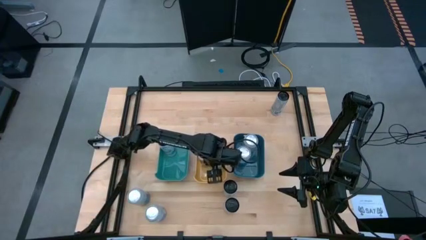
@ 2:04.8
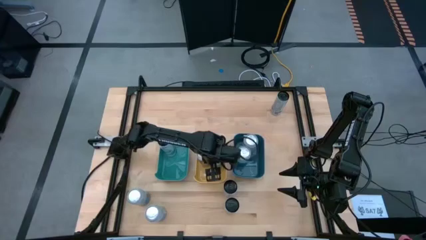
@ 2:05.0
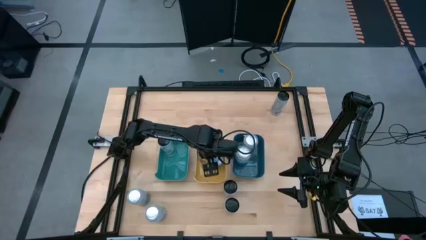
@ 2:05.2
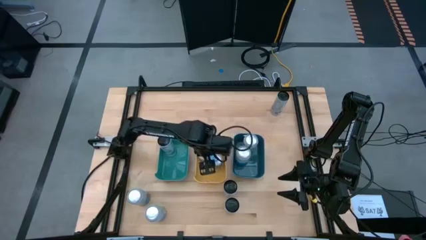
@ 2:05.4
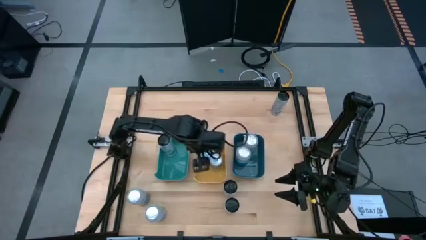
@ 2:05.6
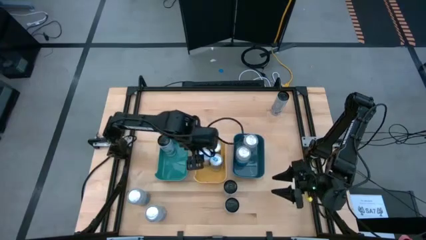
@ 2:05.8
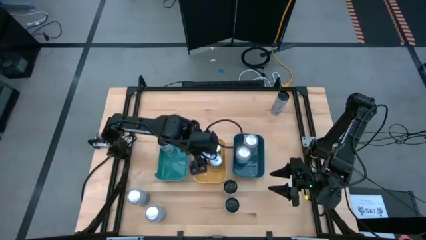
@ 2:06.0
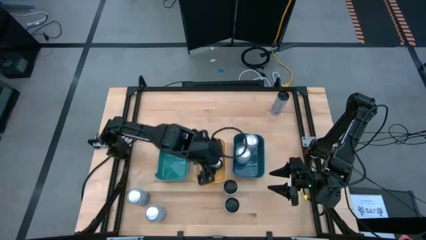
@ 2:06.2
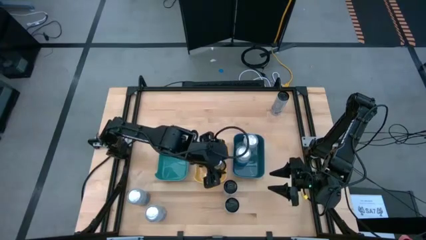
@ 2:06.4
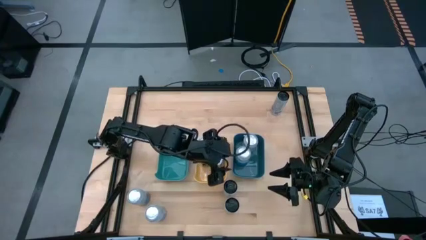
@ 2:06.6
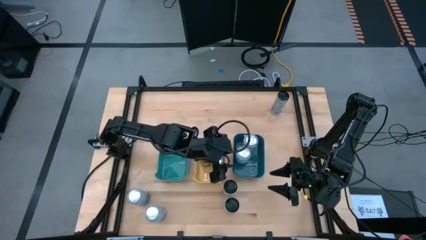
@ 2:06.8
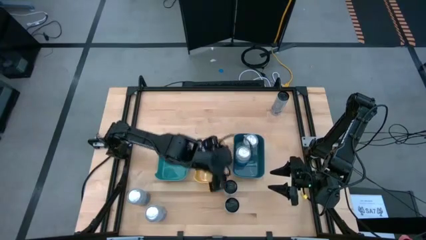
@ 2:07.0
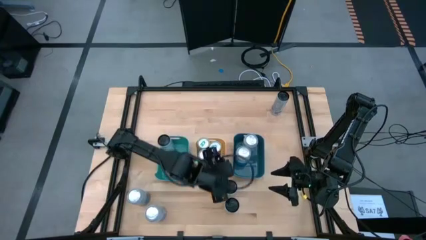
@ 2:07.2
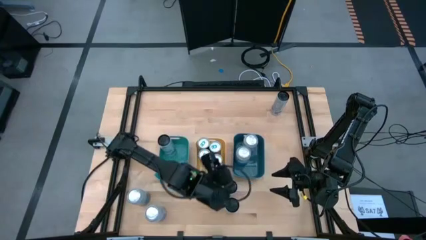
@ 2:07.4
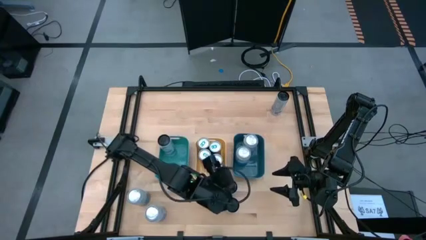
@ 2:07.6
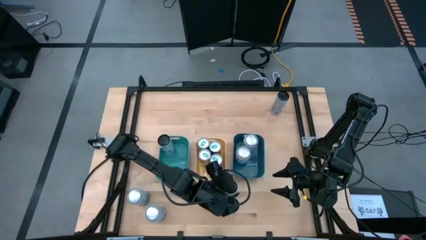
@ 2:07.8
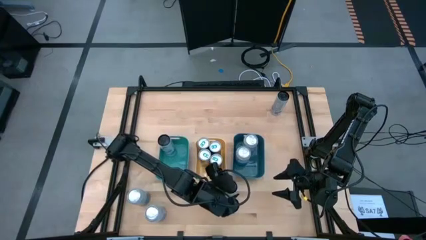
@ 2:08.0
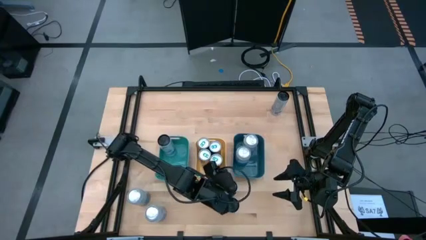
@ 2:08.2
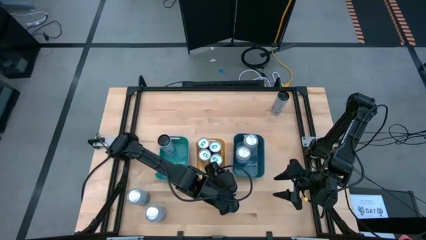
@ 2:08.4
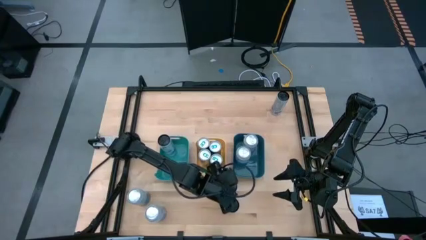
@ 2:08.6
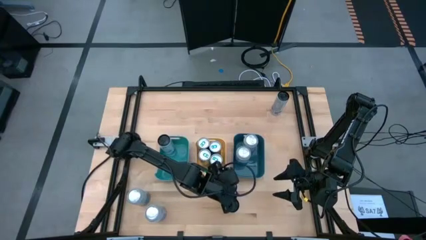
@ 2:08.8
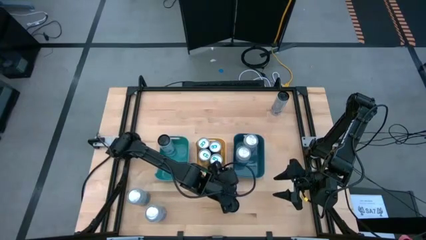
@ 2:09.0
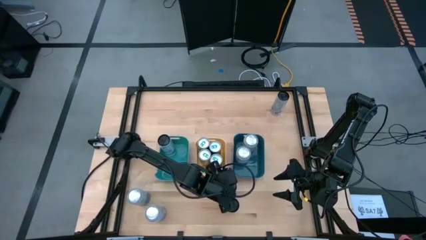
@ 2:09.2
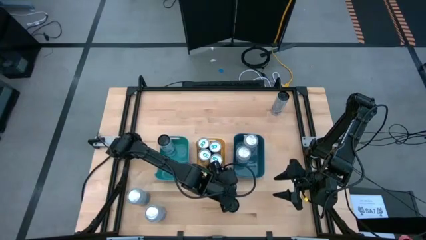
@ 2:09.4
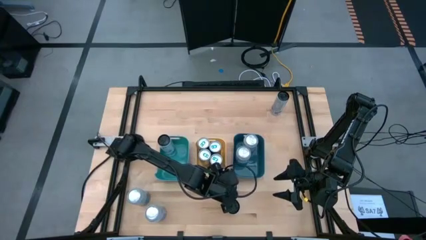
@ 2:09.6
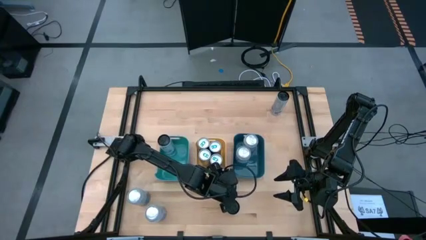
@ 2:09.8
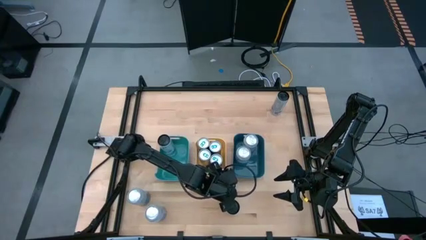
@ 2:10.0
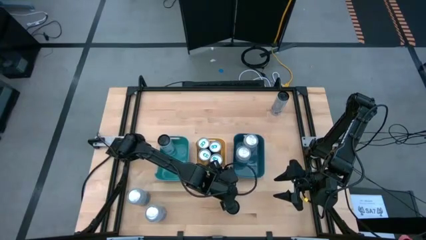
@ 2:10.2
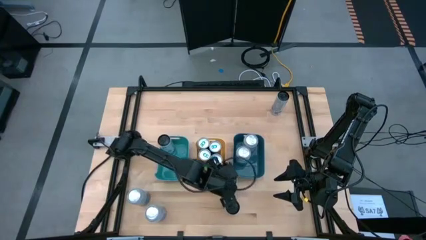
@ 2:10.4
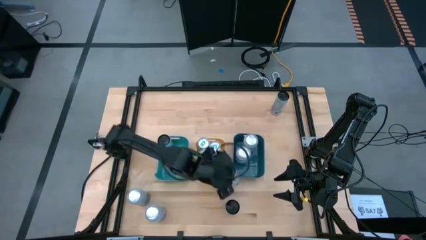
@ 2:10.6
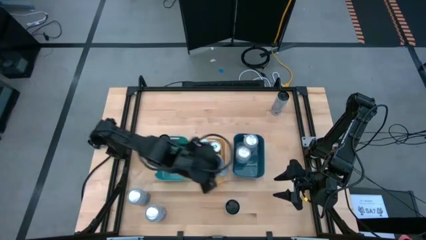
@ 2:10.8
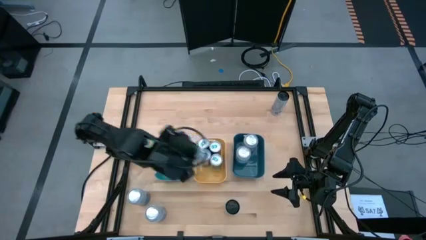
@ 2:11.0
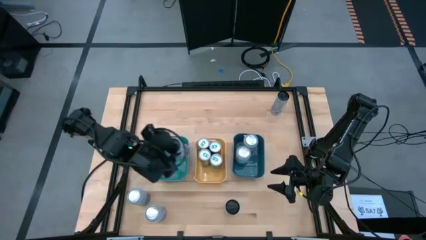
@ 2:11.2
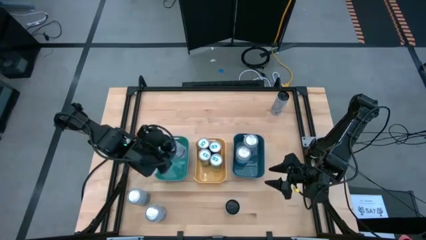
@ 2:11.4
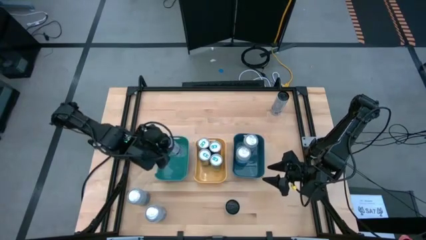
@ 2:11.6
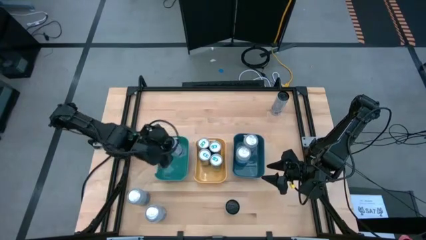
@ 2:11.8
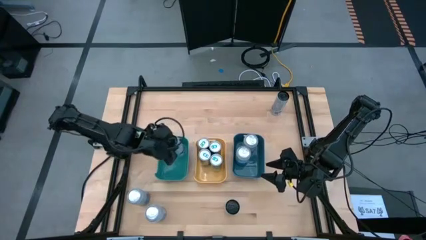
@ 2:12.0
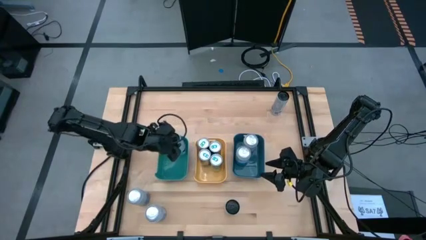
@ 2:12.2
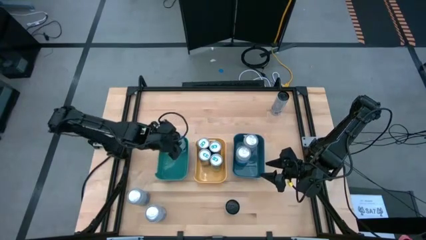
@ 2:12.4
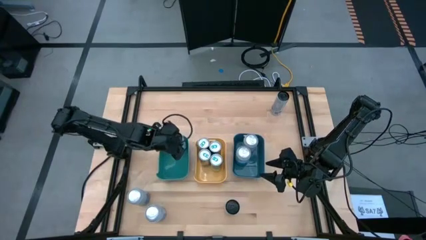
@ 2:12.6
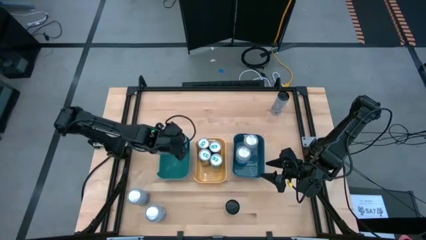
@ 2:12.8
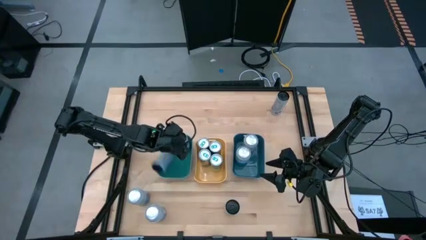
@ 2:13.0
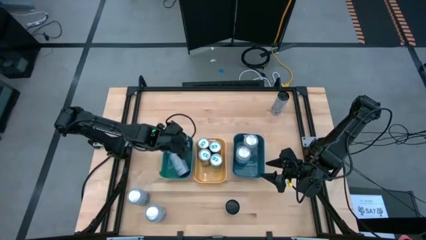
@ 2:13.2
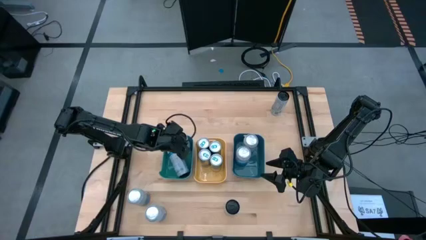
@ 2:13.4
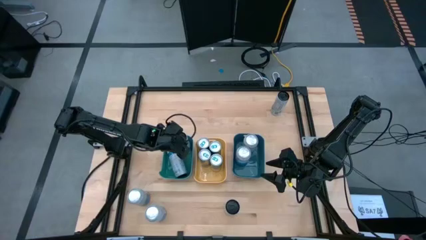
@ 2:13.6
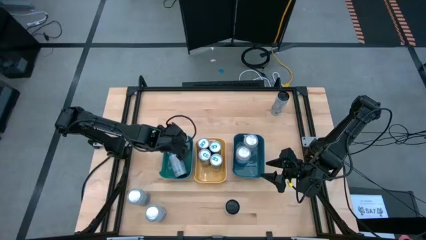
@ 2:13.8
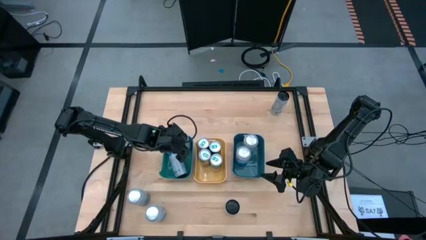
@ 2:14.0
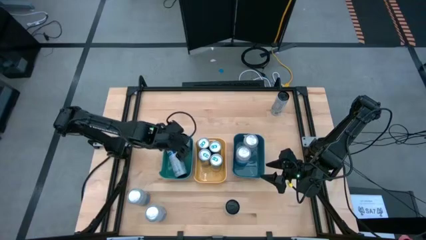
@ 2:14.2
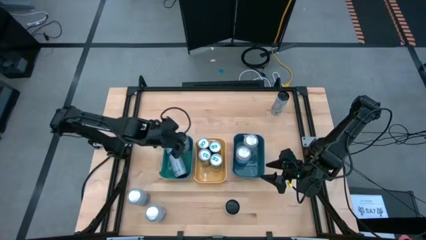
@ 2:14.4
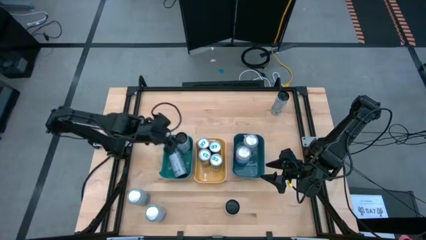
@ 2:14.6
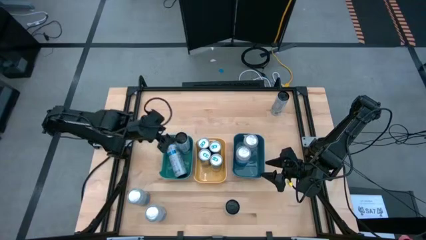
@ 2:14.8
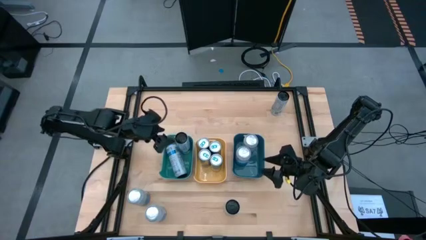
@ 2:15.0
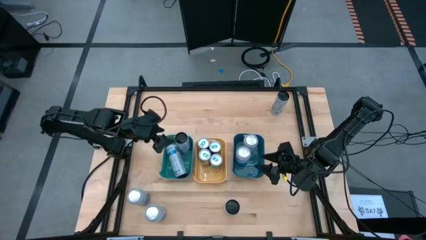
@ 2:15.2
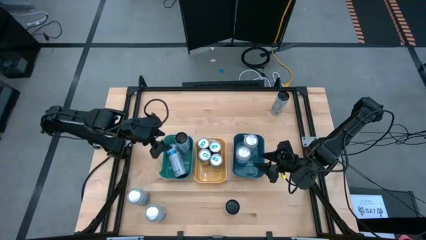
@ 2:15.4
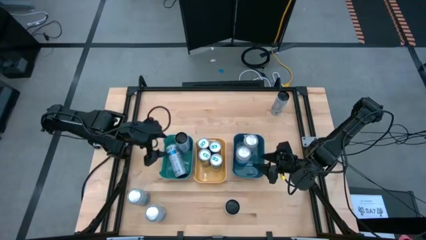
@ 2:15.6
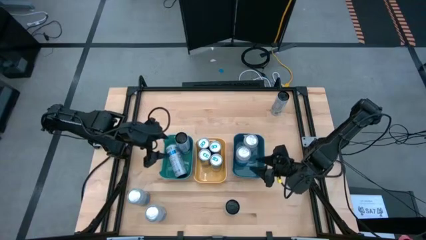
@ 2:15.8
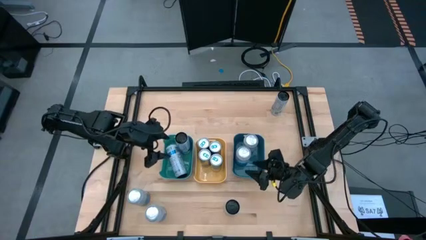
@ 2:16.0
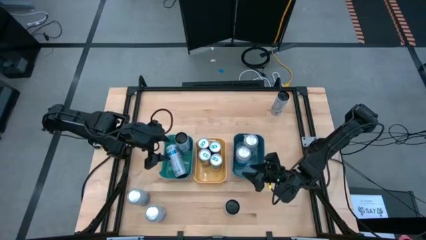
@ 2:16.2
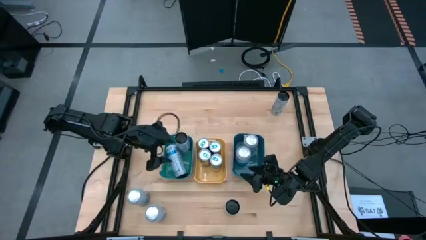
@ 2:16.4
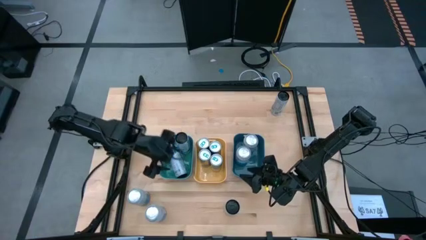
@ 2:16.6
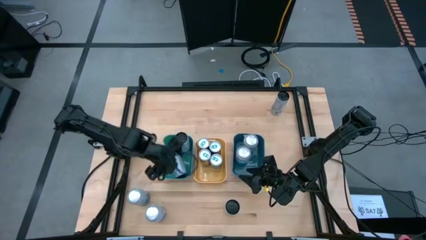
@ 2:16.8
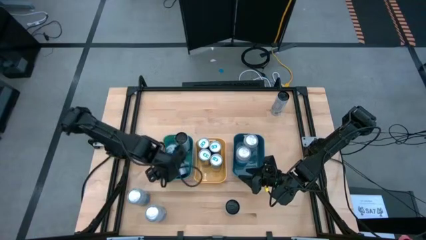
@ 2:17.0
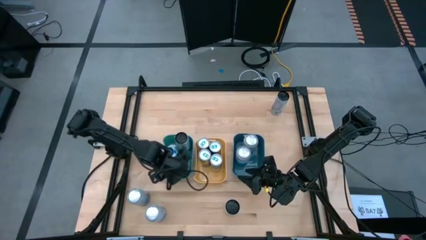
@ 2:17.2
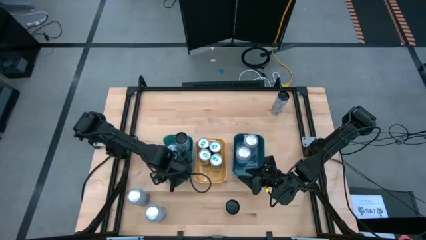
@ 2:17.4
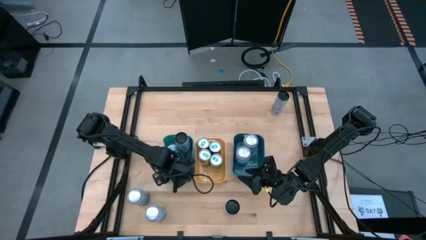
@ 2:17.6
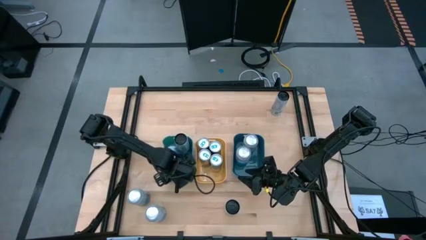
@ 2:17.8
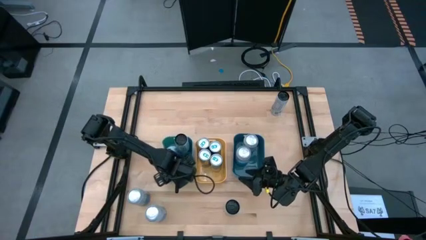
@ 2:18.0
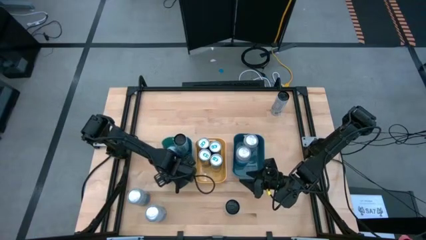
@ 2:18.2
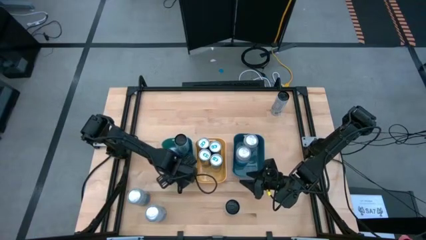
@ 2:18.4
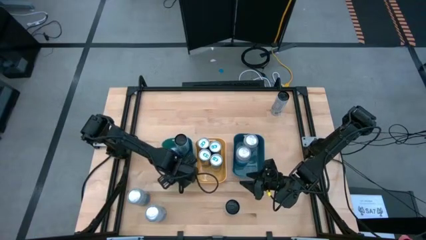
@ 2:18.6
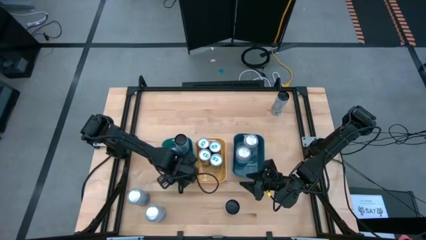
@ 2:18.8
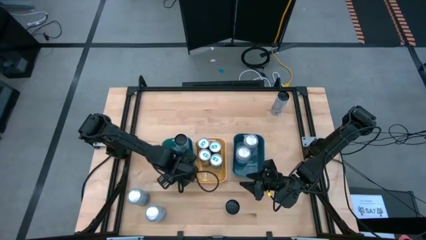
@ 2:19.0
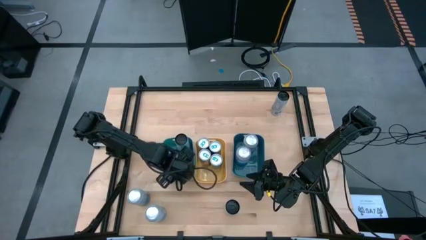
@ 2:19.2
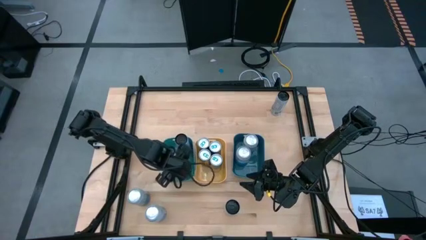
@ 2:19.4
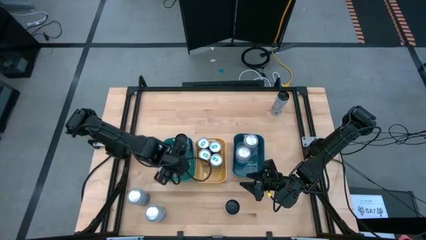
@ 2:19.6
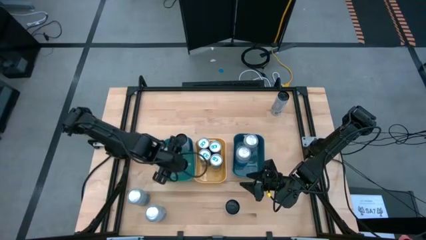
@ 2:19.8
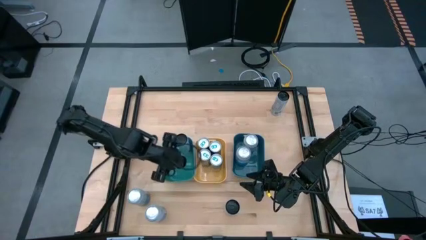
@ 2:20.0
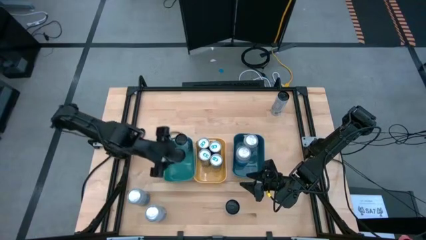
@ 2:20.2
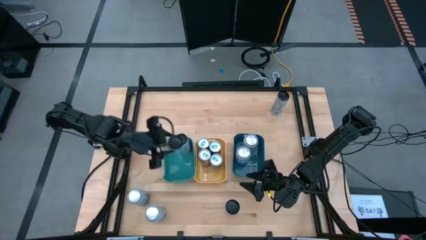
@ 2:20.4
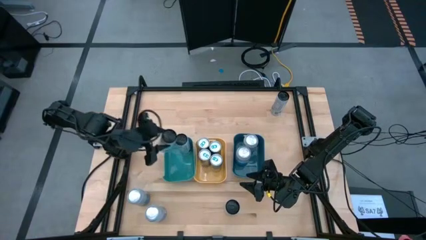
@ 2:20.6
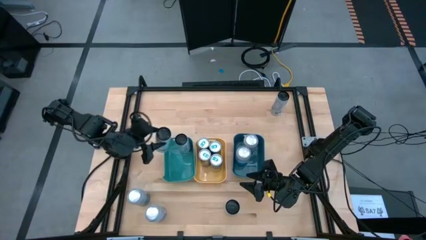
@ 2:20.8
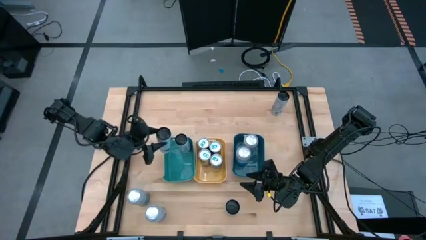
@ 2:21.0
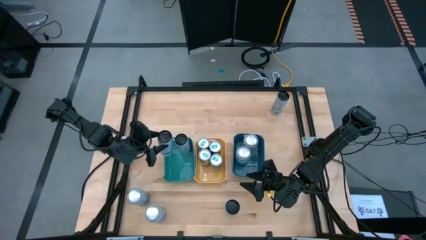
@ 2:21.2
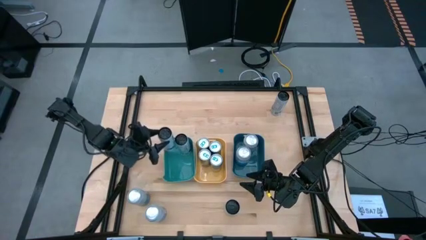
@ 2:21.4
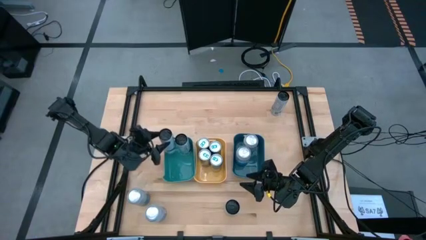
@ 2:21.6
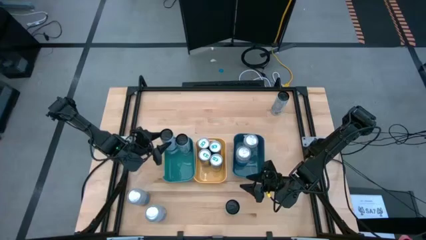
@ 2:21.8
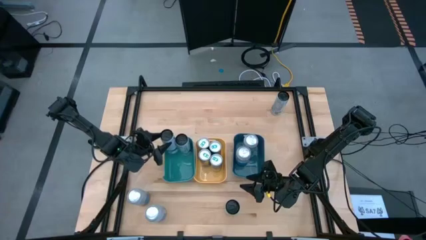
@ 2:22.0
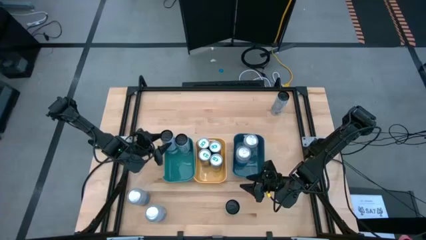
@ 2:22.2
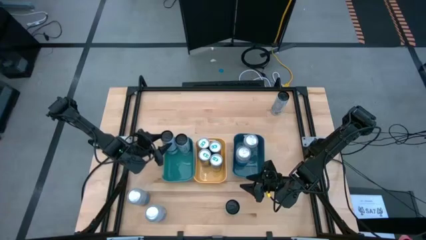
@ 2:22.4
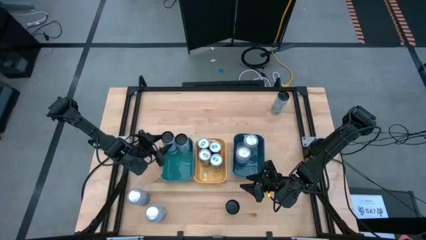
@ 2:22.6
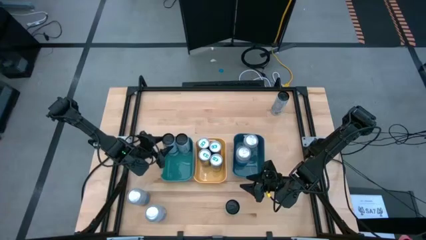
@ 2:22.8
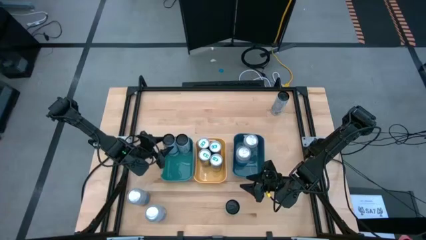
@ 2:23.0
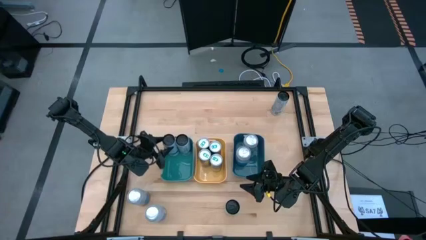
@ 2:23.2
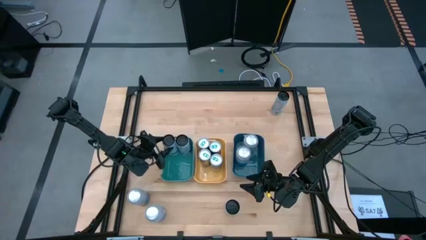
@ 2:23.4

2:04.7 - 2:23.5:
Task: Sort soda cans
Put the top bottom left black can into the light green bin and adjust the can
